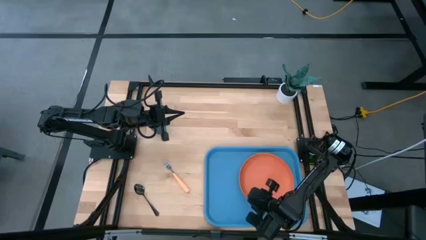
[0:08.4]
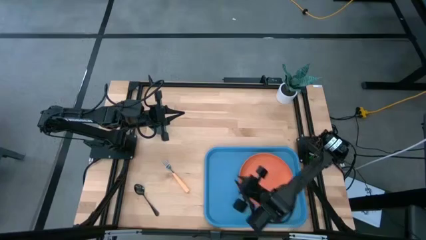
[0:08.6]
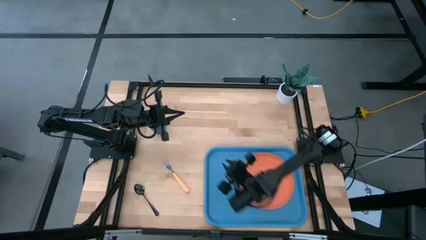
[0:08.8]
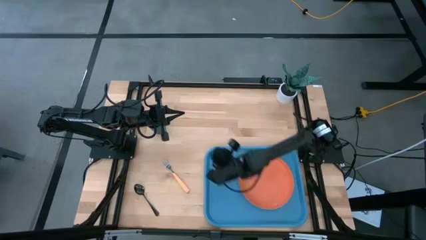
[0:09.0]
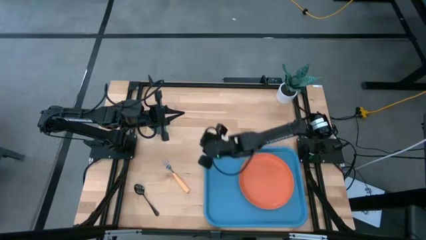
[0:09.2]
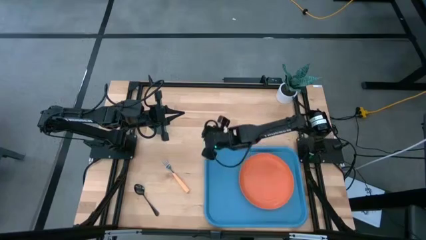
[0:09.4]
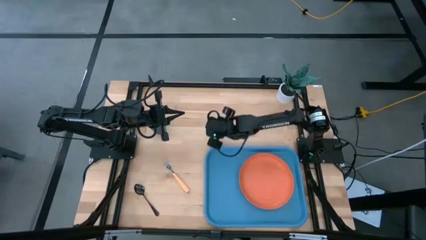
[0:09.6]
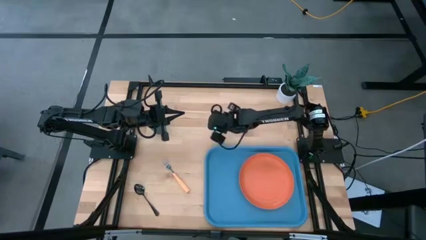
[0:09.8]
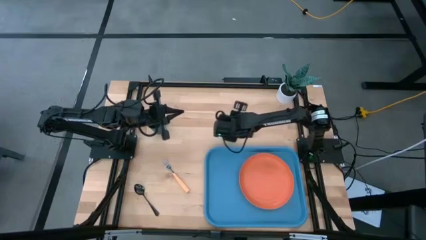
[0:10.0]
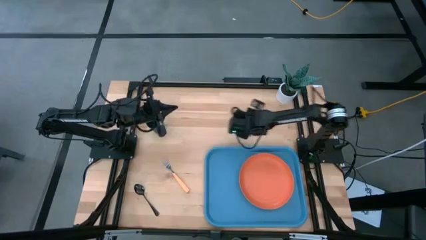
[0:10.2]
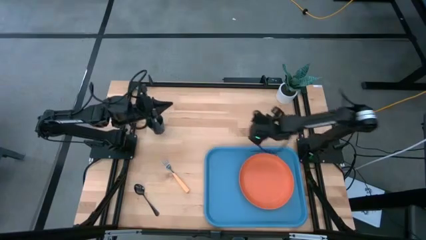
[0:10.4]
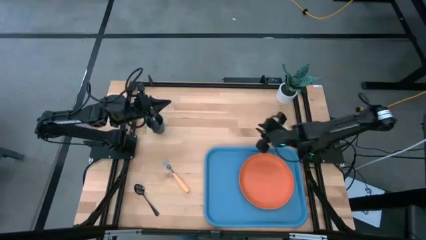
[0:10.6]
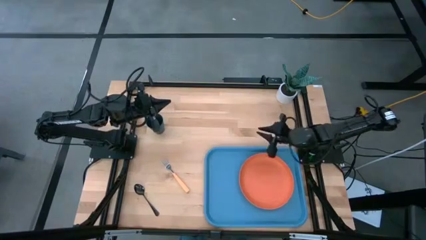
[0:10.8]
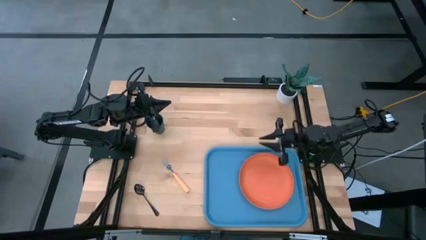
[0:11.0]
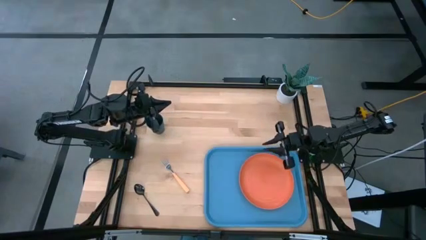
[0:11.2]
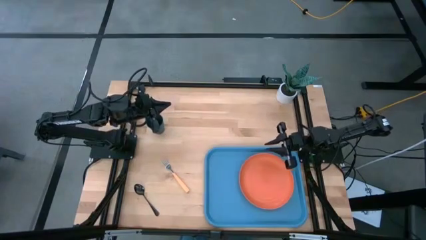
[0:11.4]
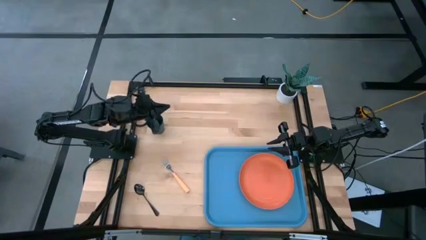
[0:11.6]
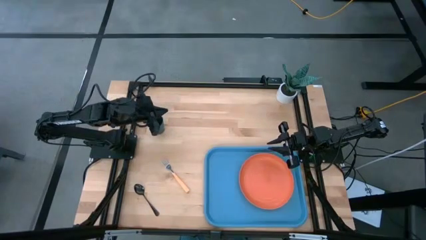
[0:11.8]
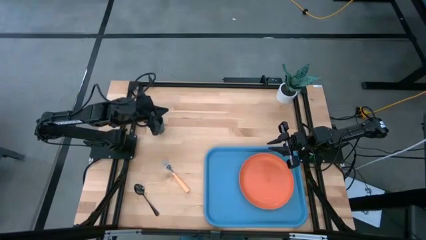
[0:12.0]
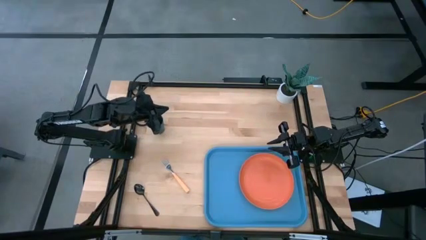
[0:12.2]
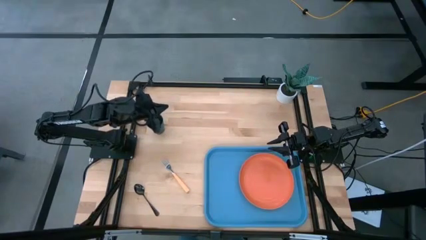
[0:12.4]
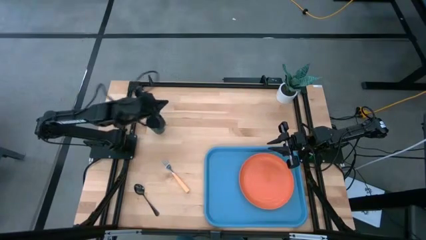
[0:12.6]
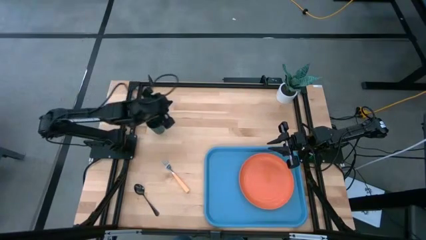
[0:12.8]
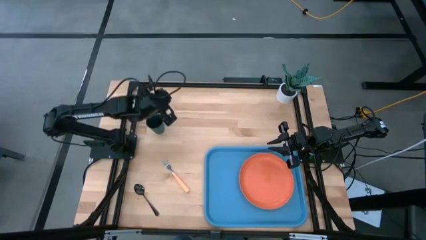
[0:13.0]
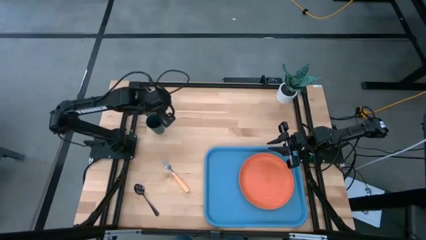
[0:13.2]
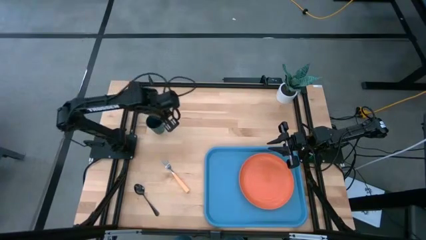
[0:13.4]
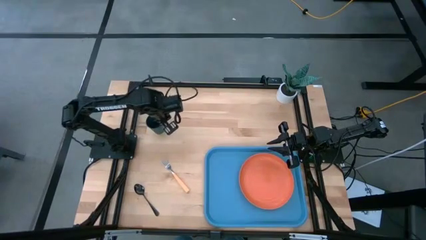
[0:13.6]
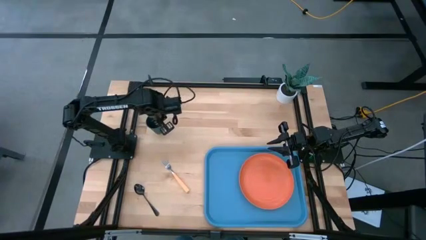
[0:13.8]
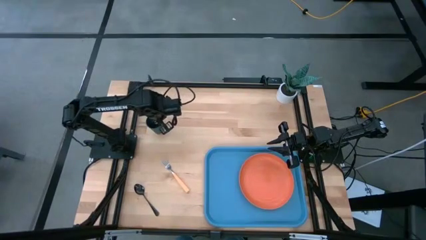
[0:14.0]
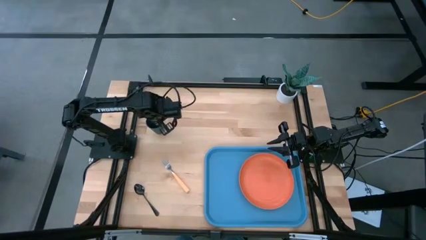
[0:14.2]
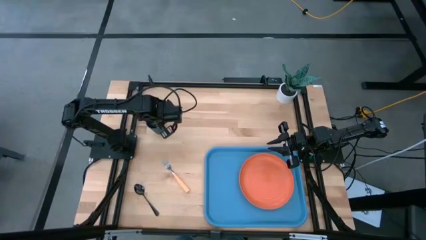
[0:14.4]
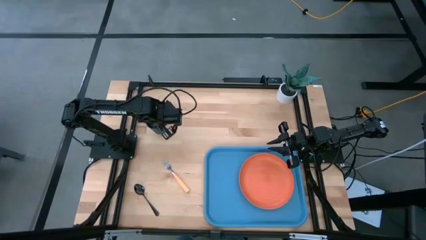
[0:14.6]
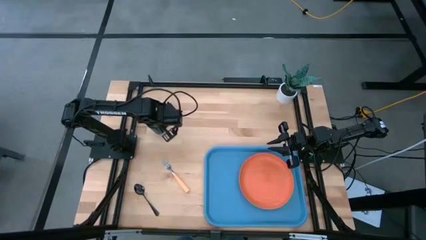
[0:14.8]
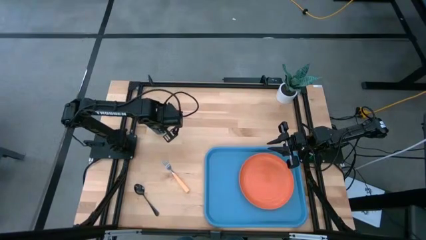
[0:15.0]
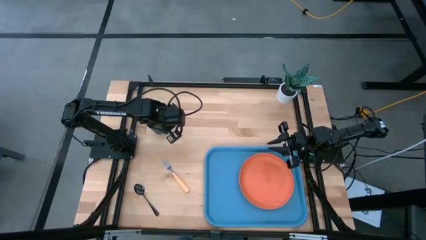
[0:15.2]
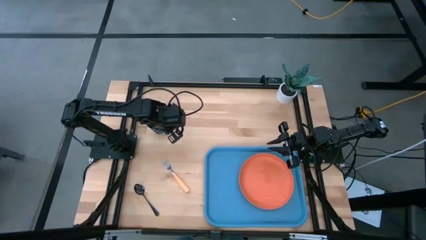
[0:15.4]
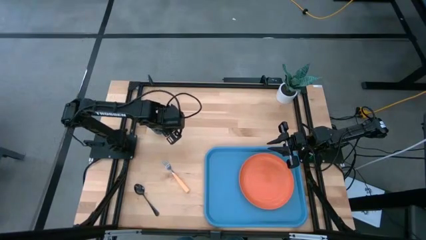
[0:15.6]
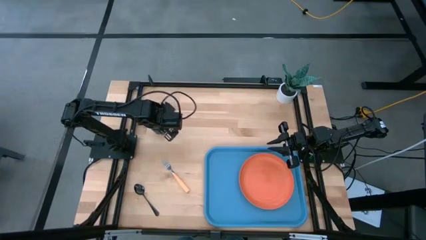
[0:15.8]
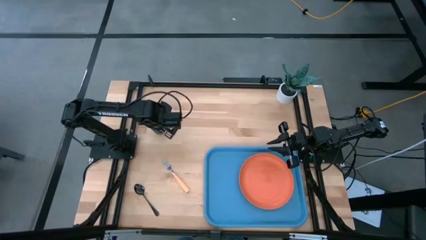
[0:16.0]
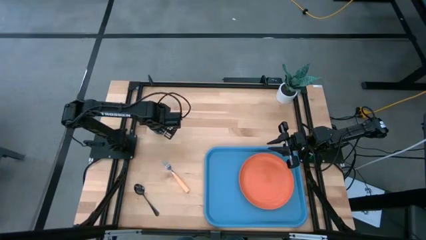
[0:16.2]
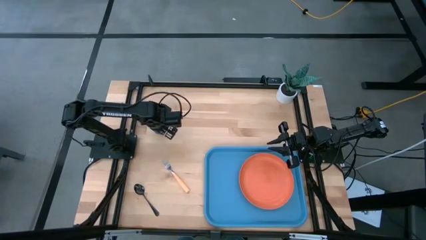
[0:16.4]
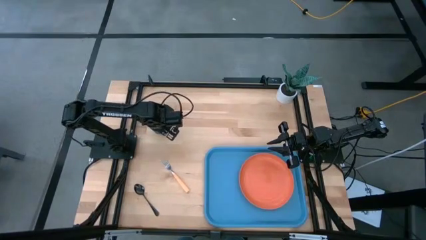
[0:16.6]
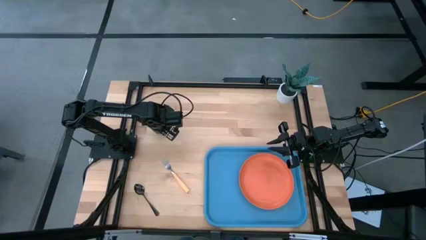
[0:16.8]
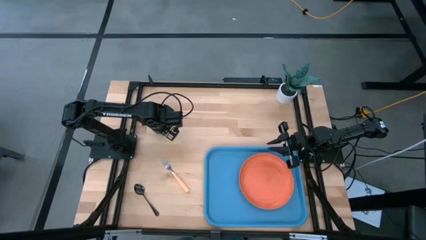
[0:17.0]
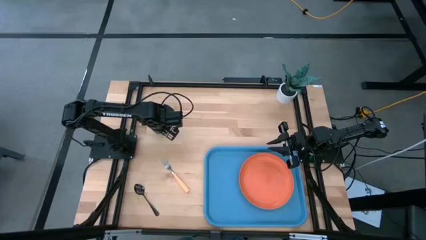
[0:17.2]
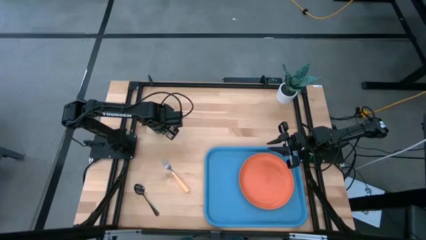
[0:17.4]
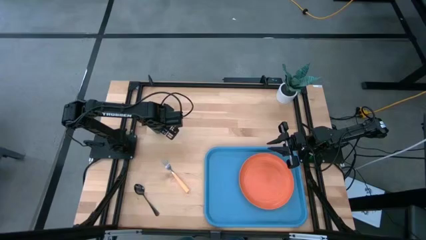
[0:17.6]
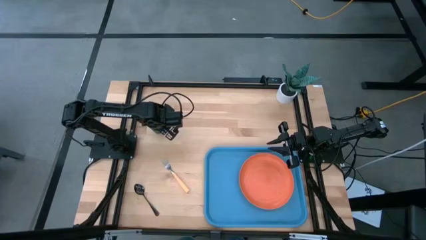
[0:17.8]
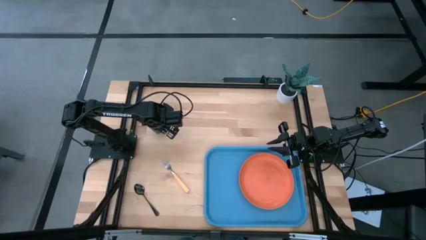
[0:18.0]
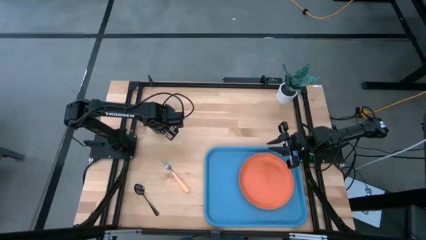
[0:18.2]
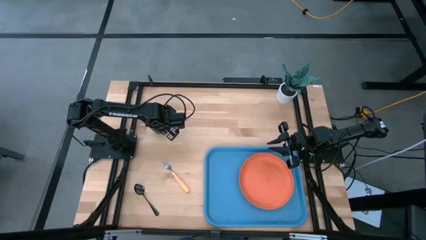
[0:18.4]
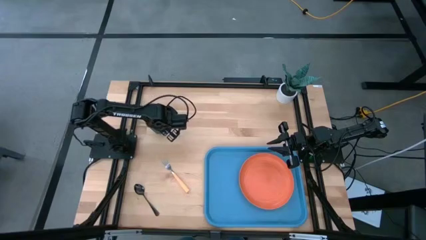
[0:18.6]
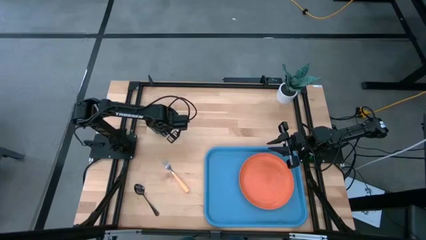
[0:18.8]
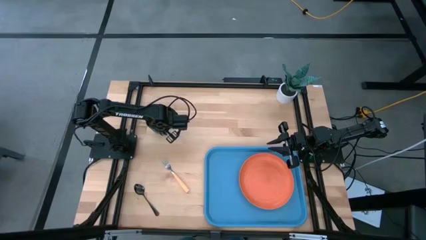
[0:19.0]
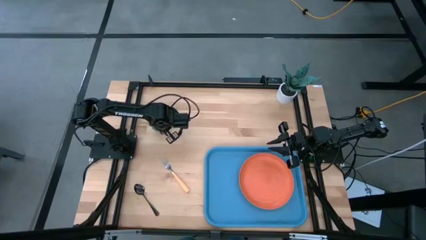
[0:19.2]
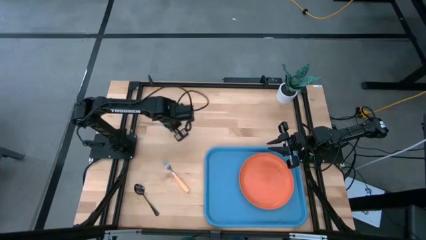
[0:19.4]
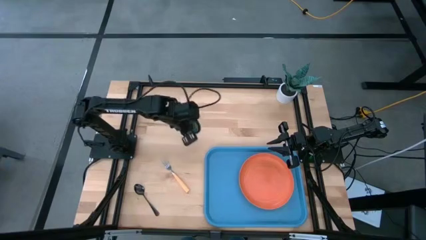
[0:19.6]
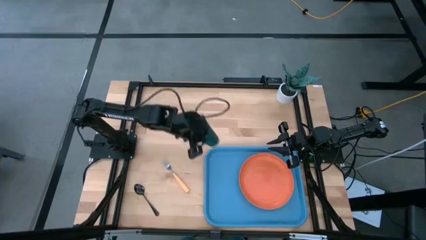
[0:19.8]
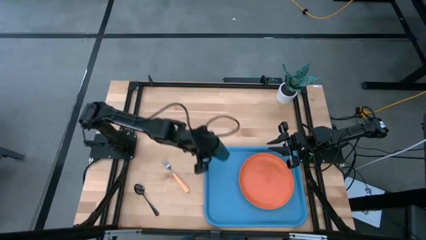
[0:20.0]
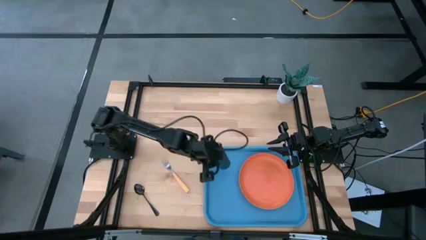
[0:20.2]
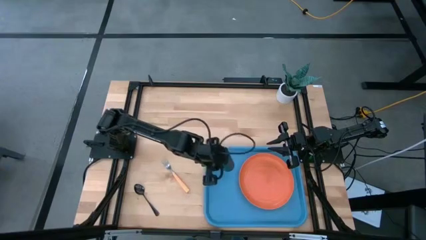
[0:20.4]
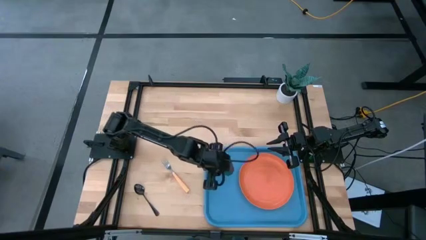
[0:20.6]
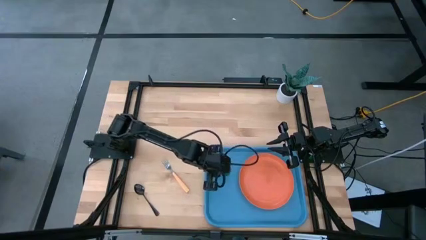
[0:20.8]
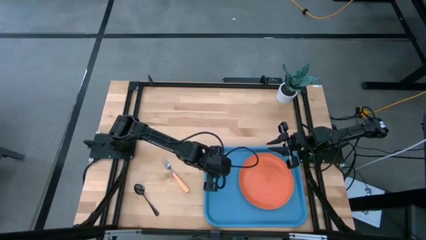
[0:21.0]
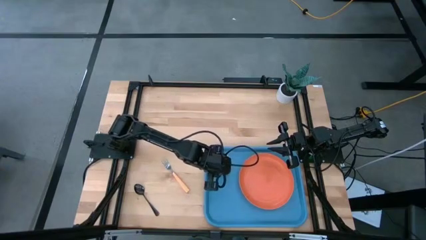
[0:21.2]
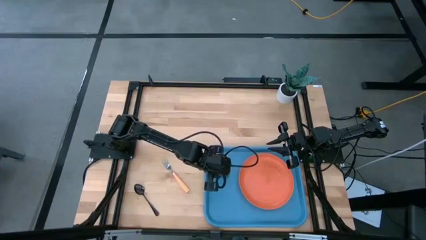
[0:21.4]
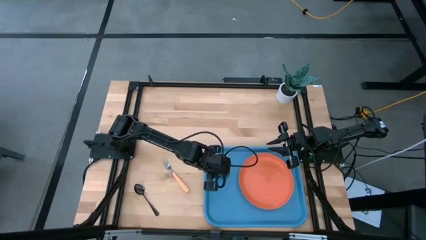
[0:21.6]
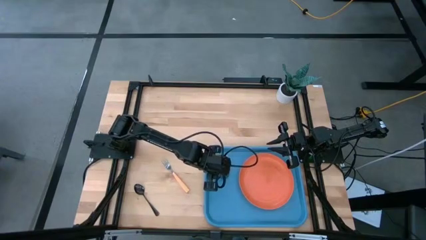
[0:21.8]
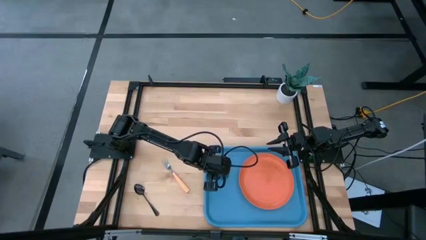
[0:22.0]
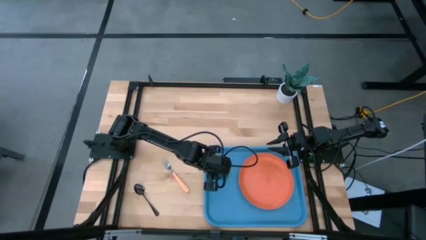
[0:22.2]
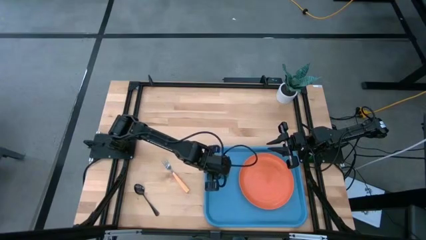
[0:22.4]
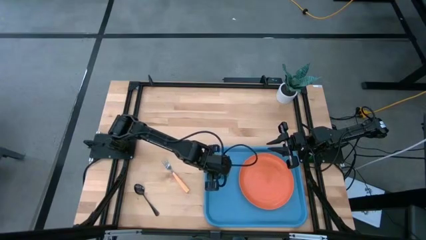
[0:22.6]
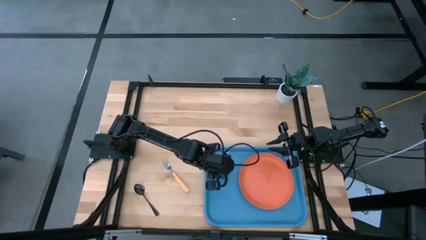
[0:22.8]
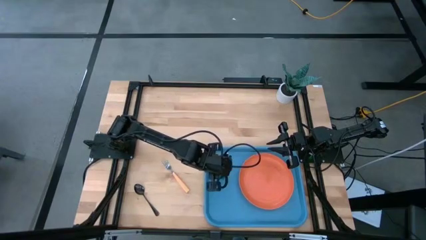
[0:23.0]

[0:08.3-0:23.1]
Task: Pick and place plate/cup/fork/spoon on tray
Put the green cup on the blue serving tray to the top left of the orange plate
